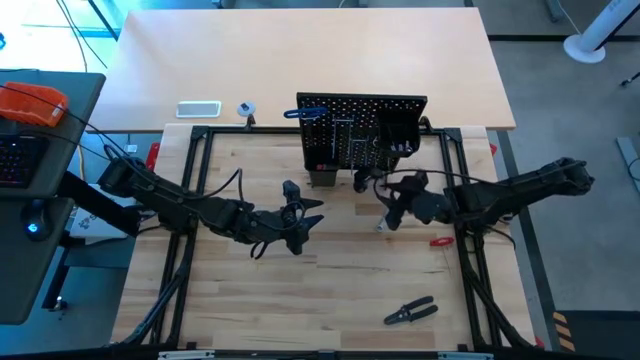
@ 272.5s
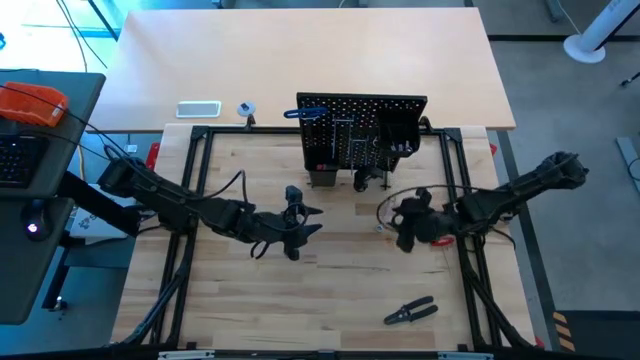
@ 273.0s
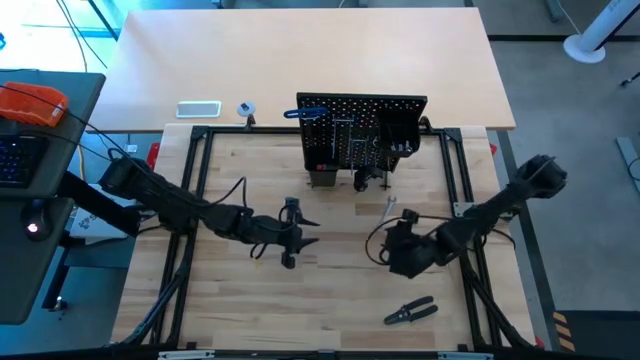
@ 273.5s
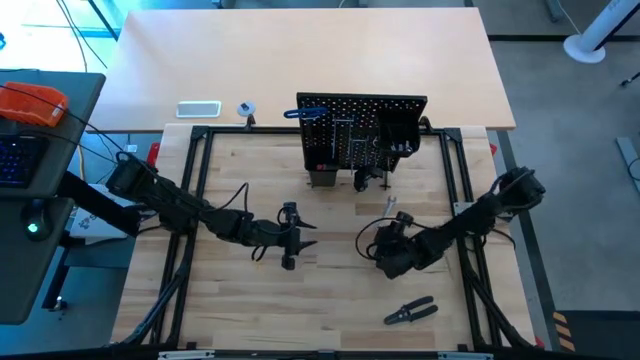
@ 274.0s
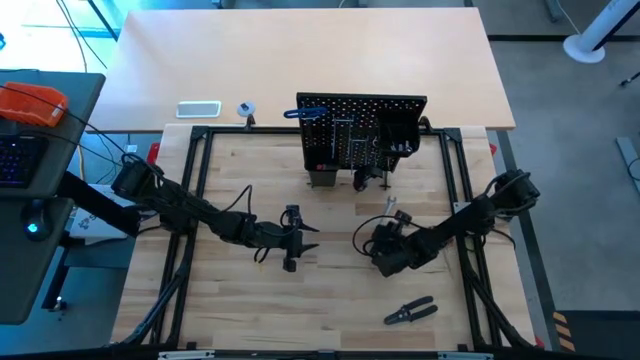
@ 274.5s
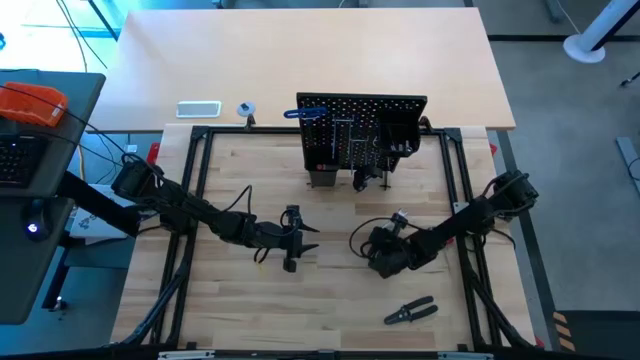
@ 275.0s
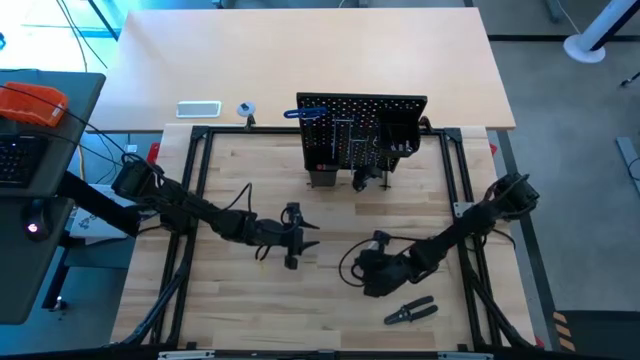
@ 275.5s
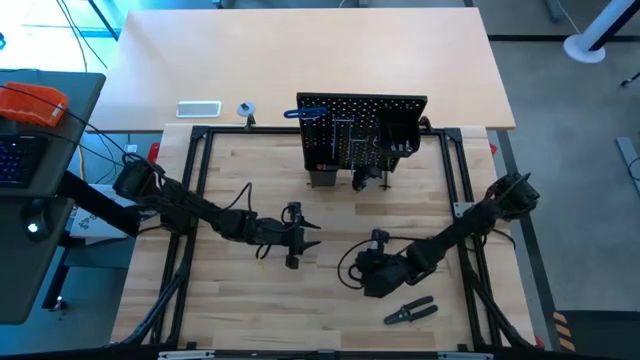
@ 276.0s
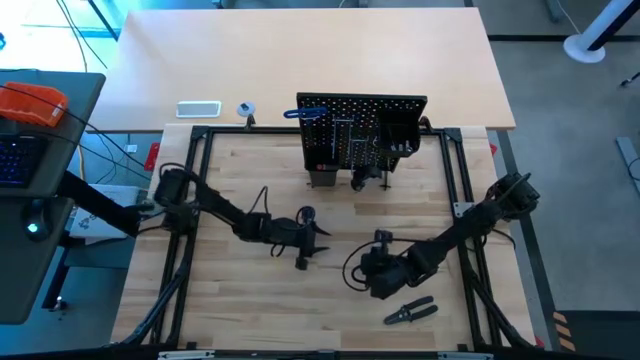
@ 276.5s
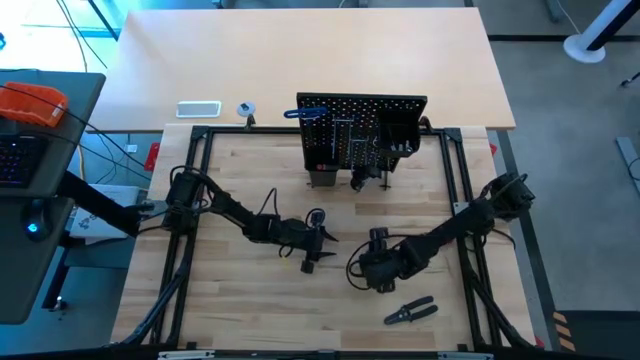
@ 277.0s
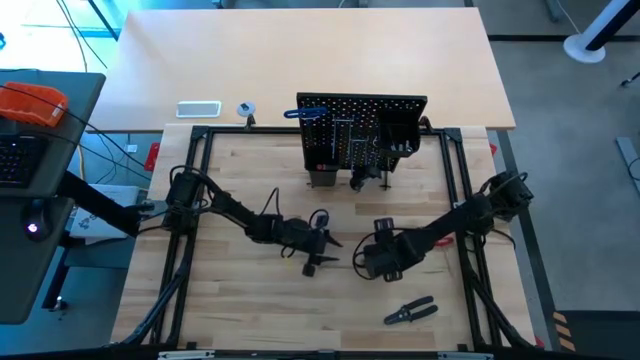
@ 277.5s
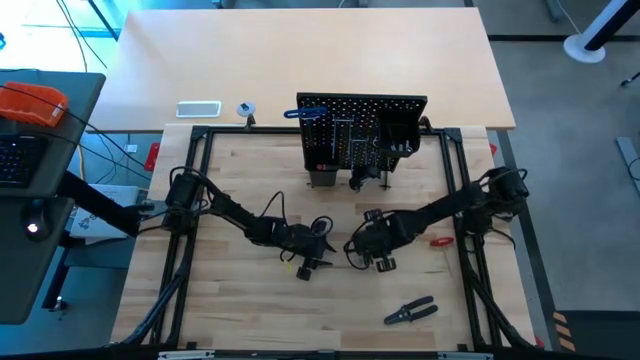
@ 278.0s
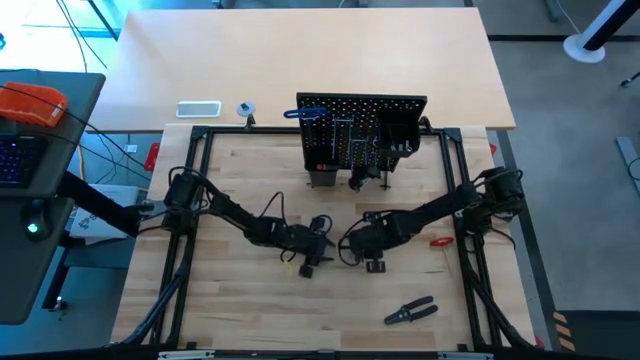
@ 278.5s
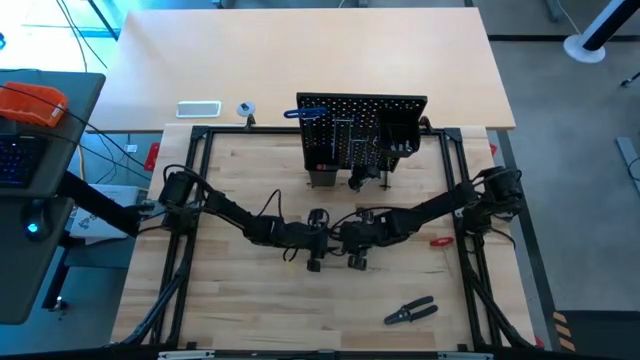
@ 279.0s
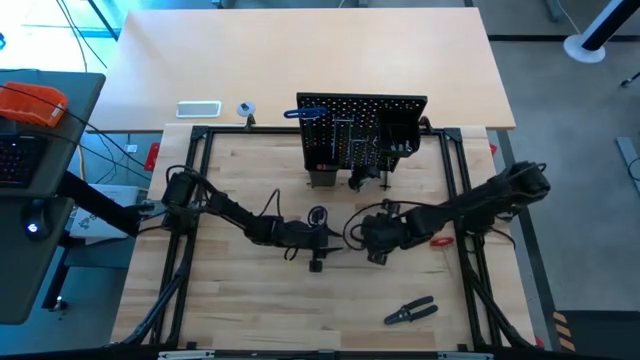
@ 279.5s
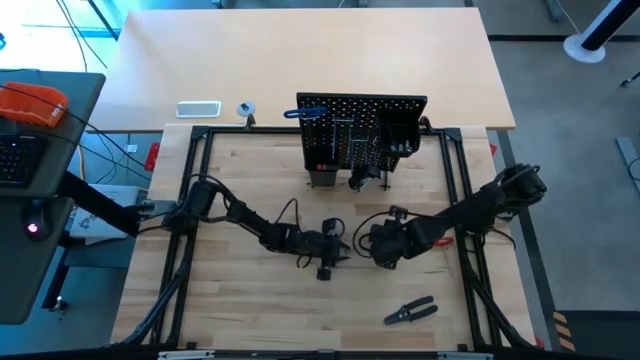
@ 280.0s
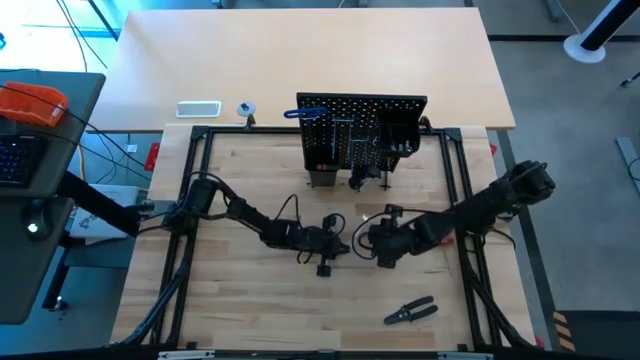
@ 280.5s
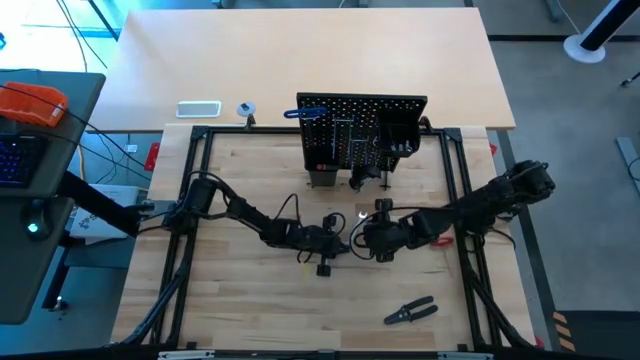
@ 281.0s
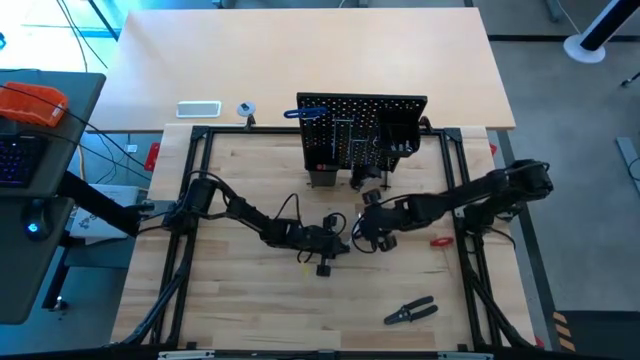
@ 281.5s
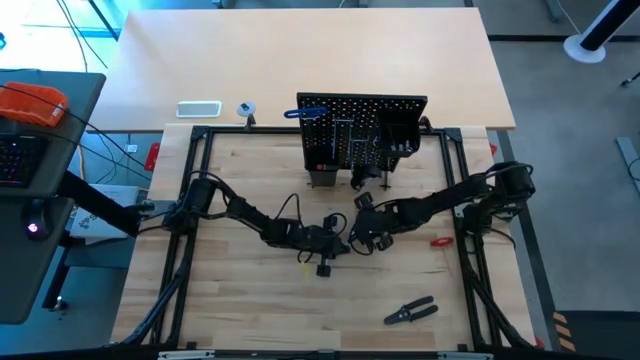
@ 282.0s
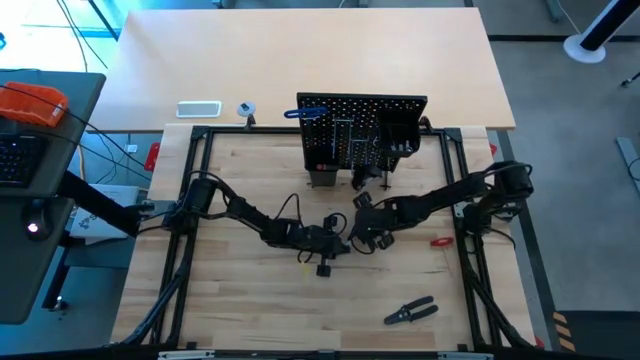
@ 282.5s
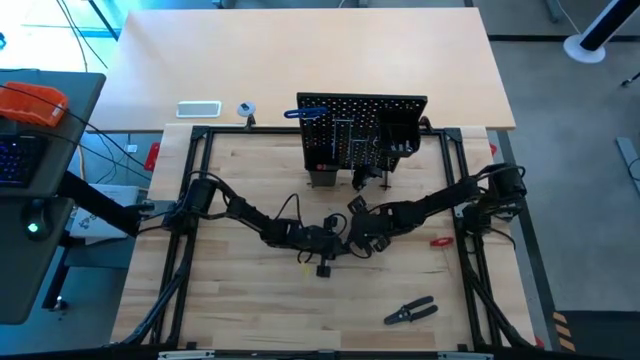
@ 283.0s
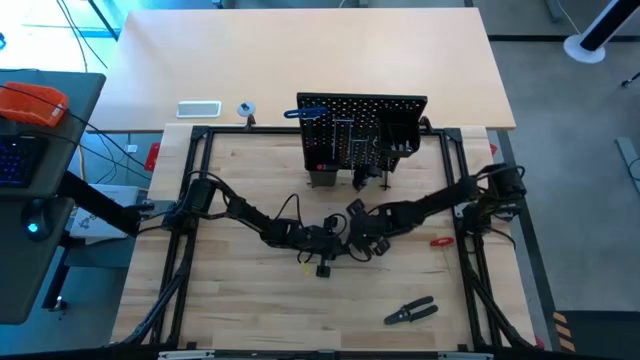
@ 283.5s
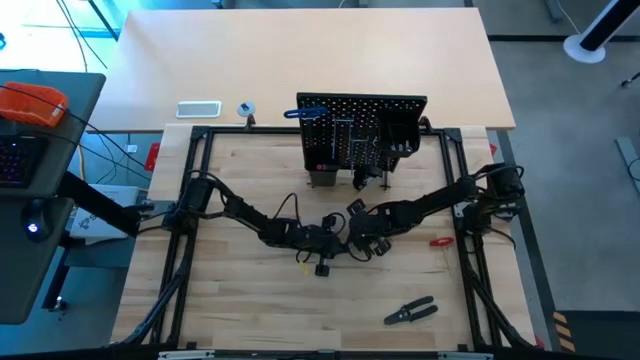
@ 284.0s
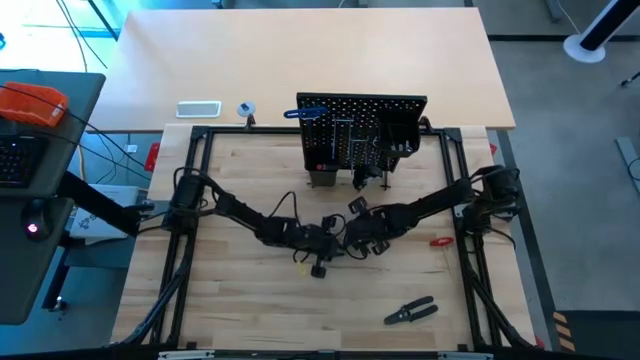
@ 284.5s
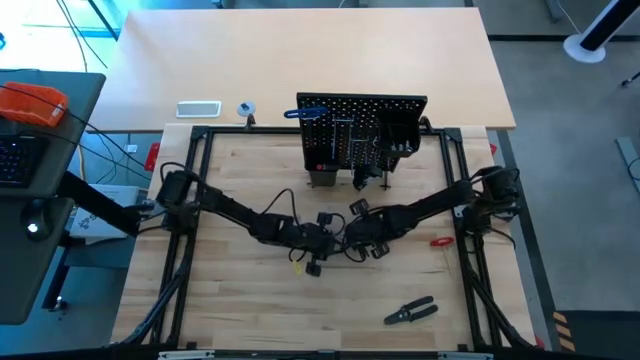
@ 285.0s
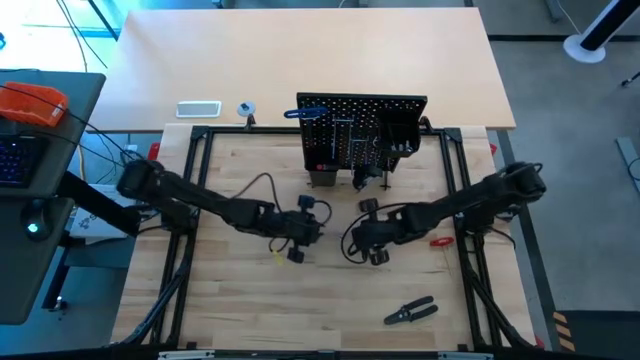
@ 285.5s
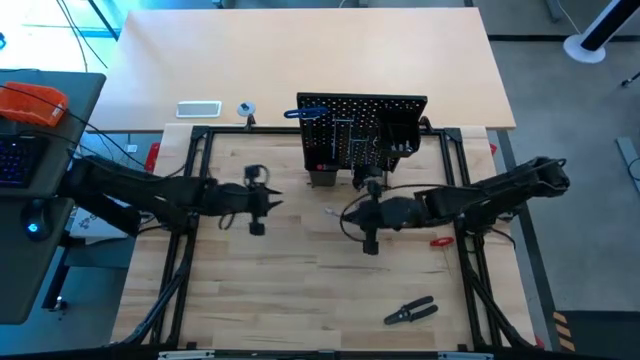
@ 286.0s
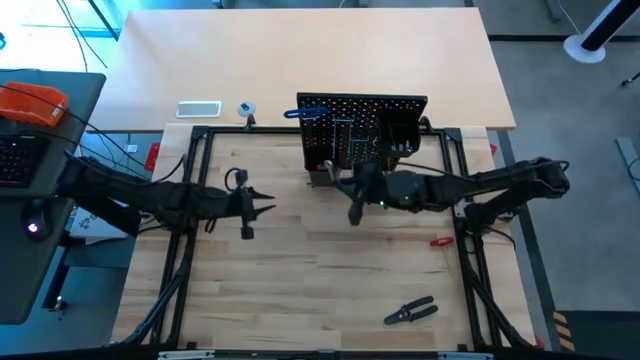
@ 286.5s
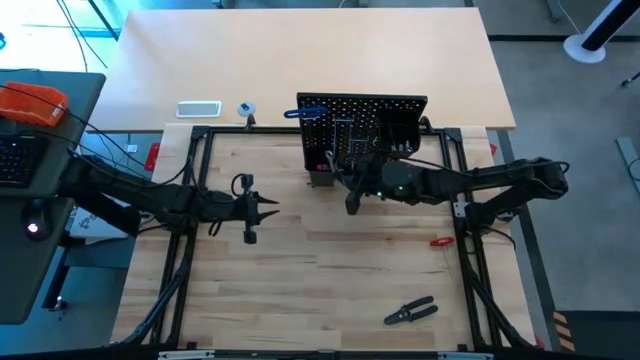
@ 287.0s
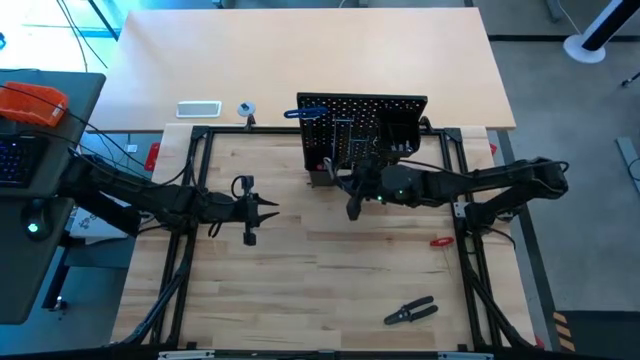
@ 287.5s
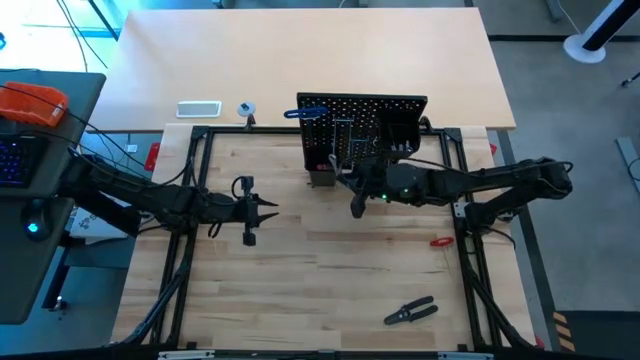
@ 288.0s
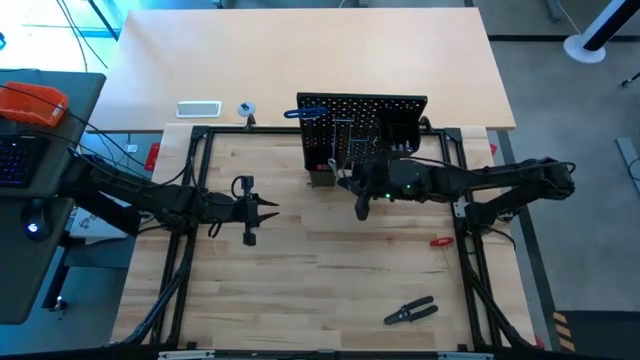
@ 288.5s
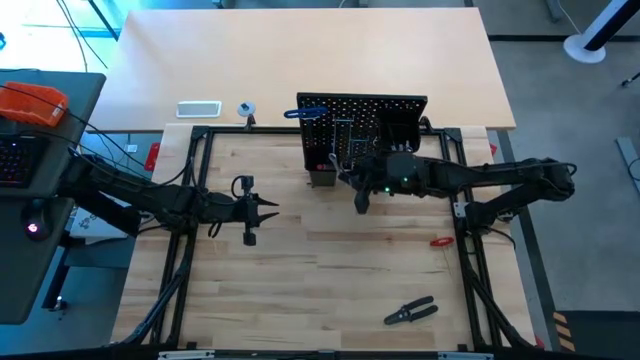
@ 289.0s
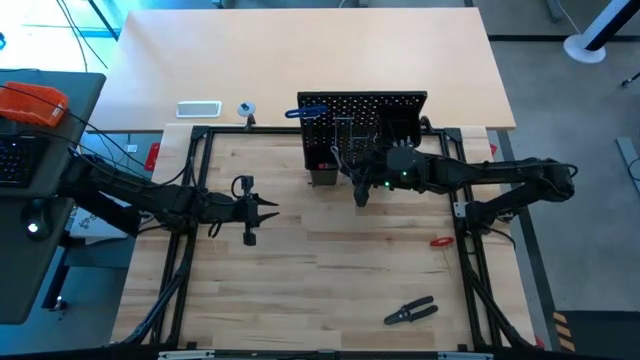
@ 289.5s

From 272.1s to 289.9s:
Task: Hang tools onto peg board
Hang the wrench on the pegboard

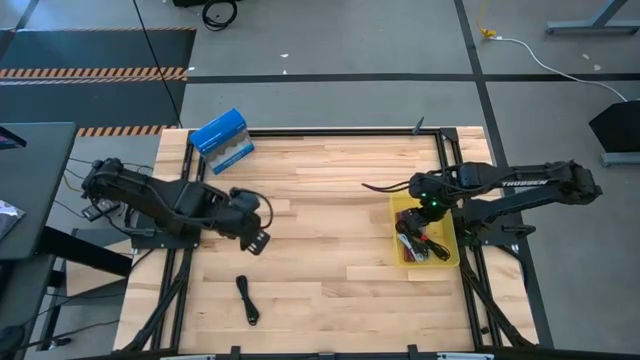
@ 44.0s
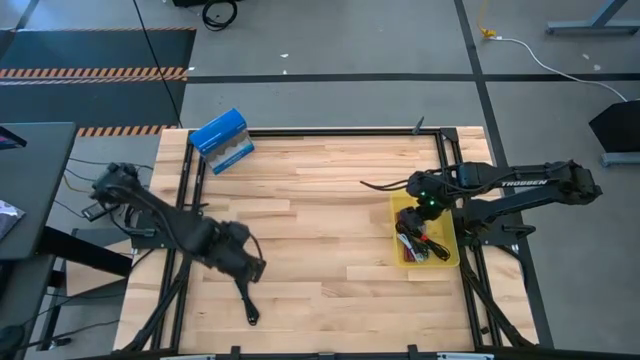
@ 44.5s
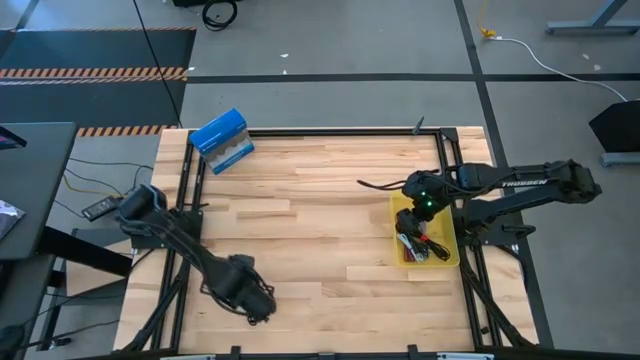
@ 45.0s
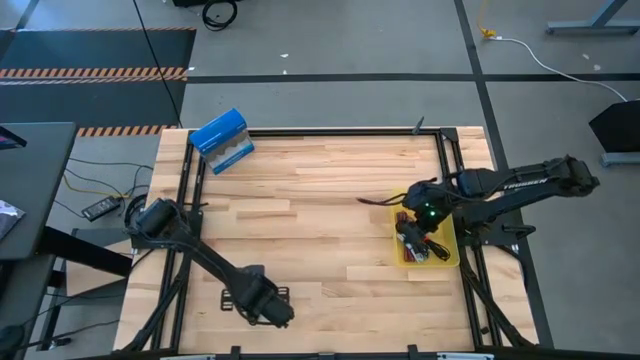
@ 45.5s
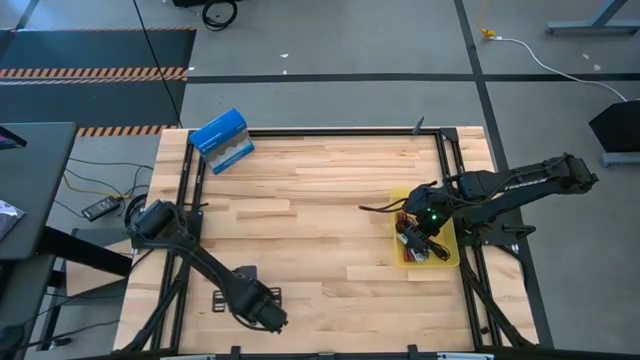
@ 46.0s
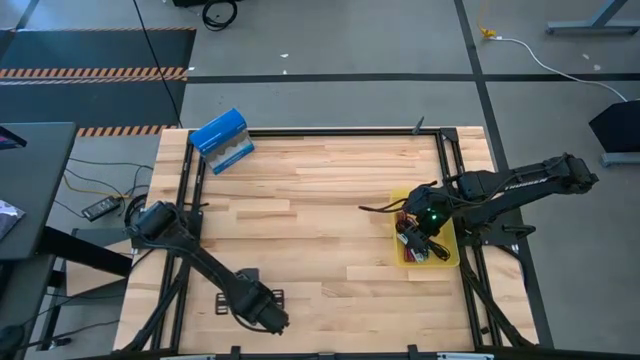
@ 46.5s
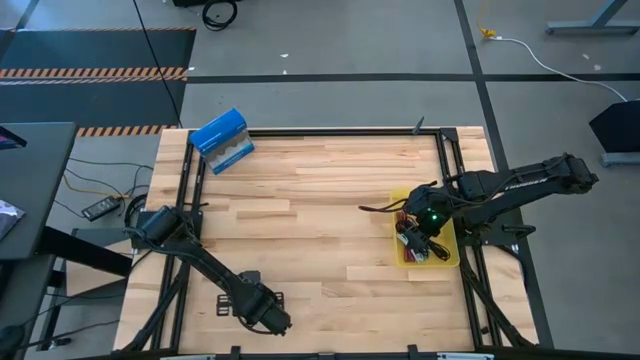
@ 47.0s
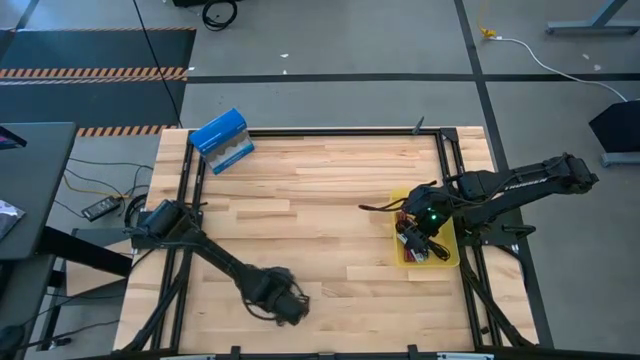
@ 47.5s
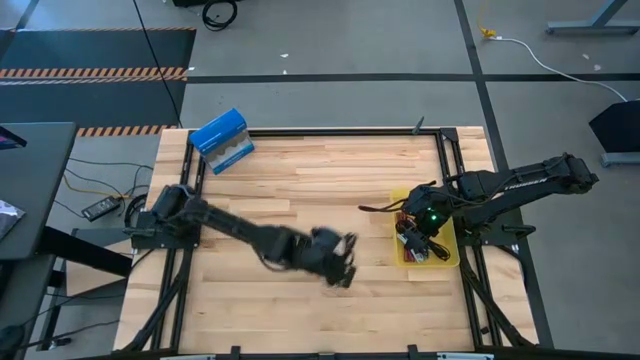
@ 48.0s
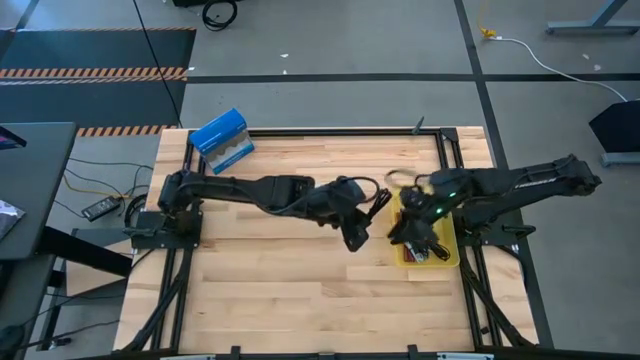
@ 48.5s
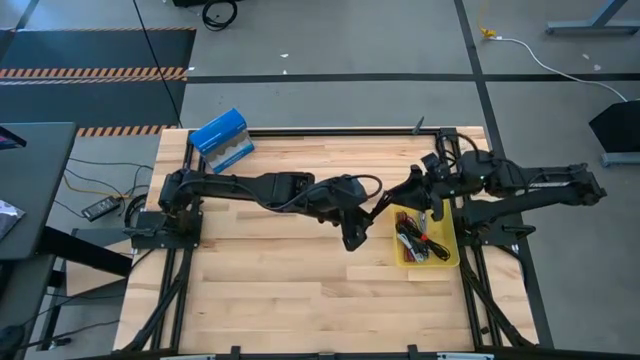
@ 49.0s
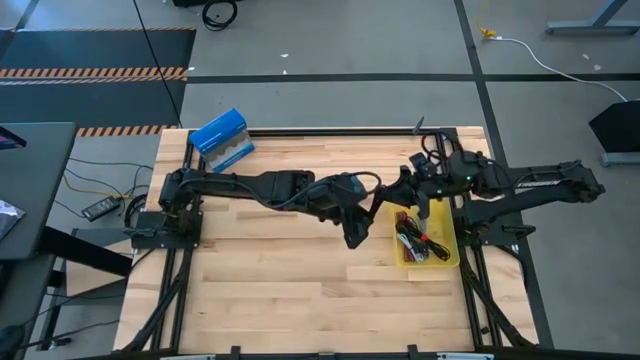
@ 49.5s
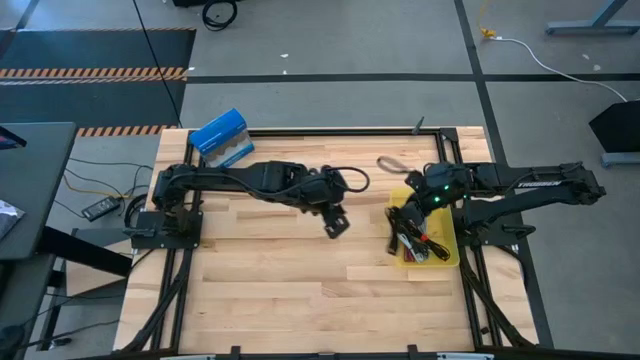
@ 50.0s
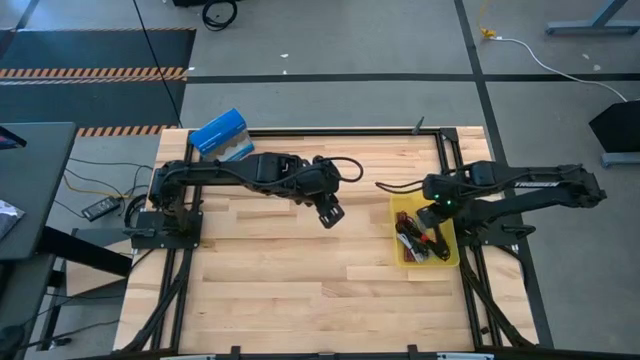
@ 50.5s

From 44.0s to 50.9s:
Task: Pick and place USB-C Cables
Put the black charger cable into the yellow bin
